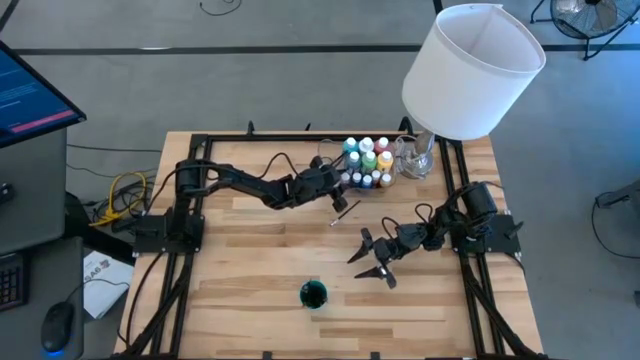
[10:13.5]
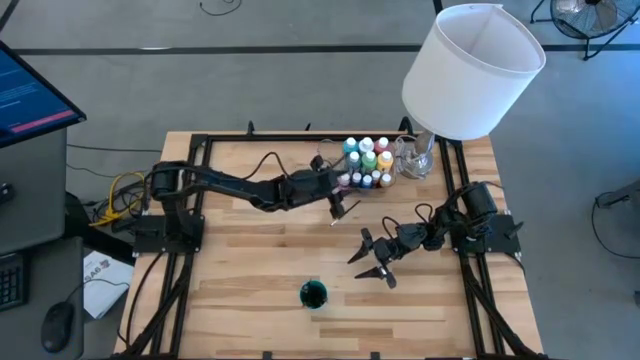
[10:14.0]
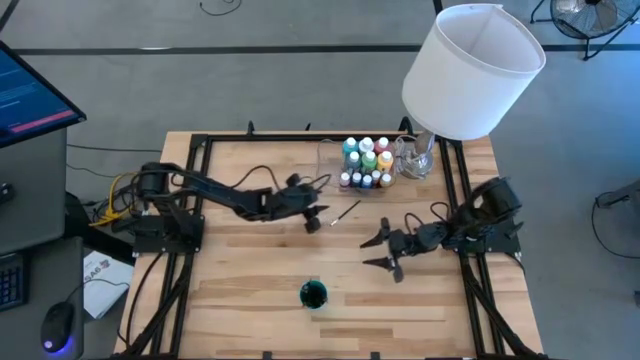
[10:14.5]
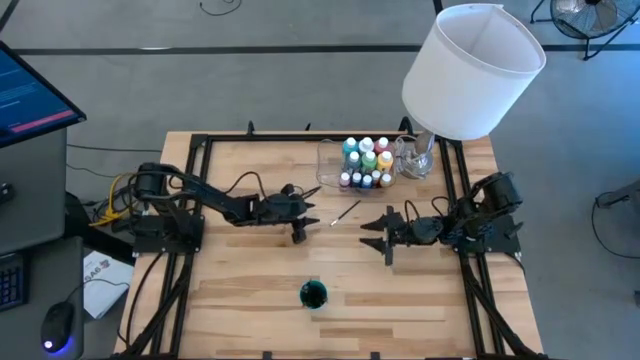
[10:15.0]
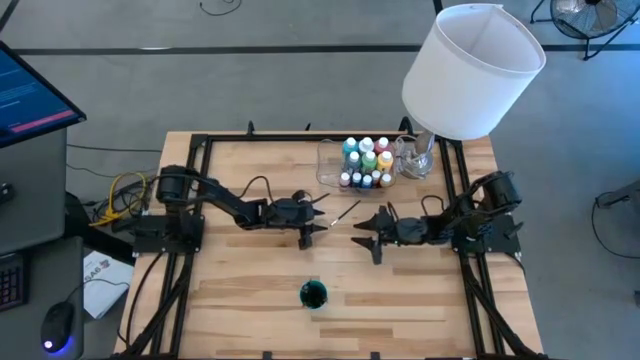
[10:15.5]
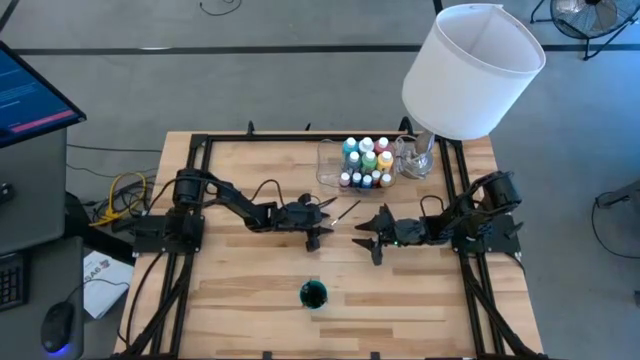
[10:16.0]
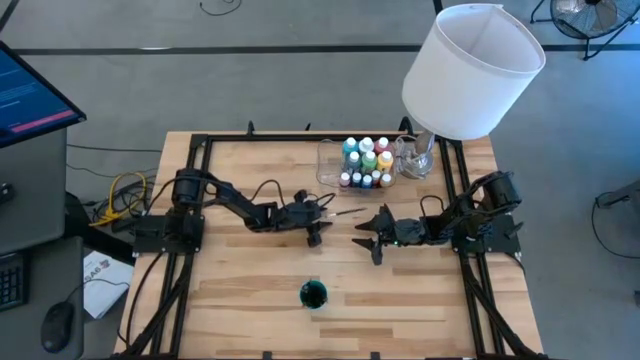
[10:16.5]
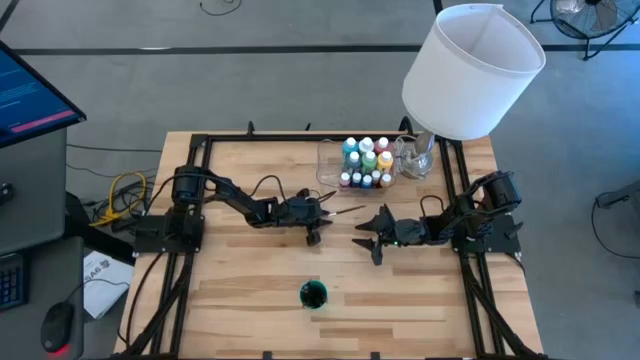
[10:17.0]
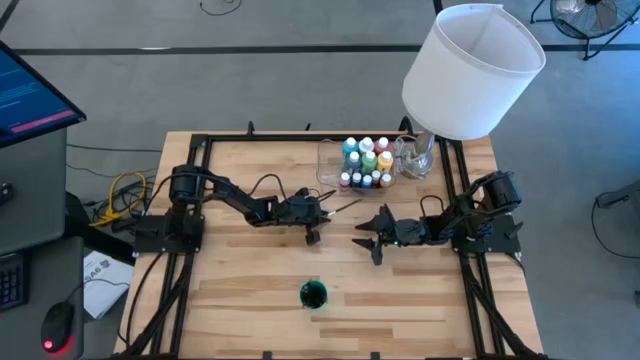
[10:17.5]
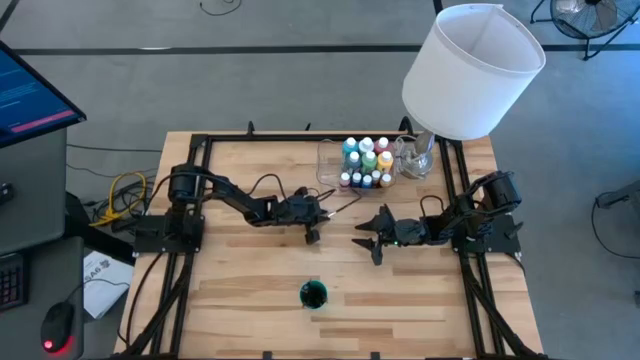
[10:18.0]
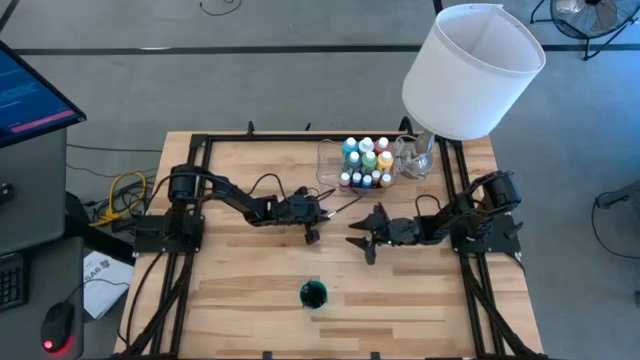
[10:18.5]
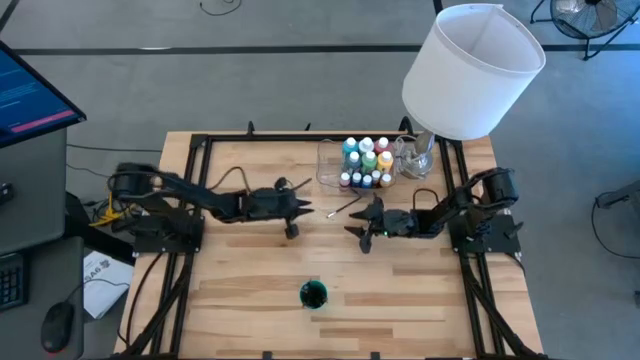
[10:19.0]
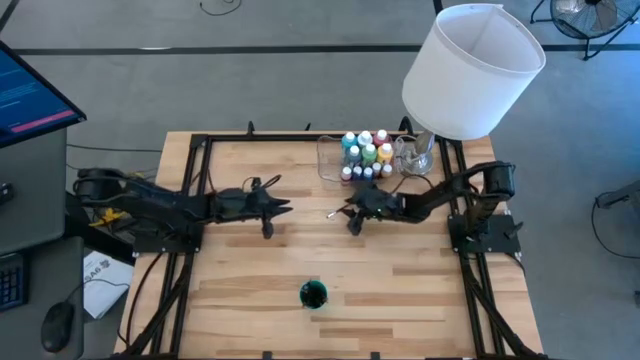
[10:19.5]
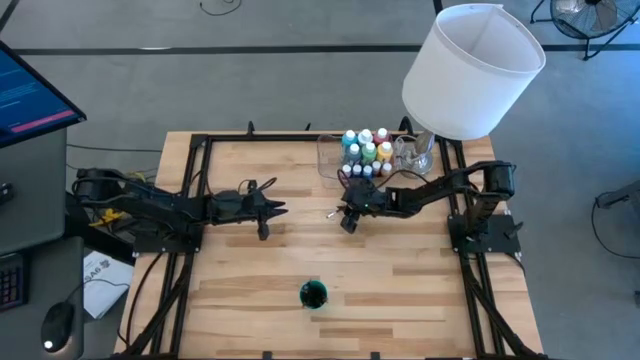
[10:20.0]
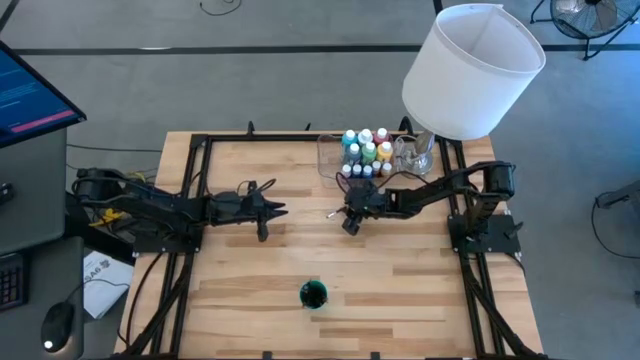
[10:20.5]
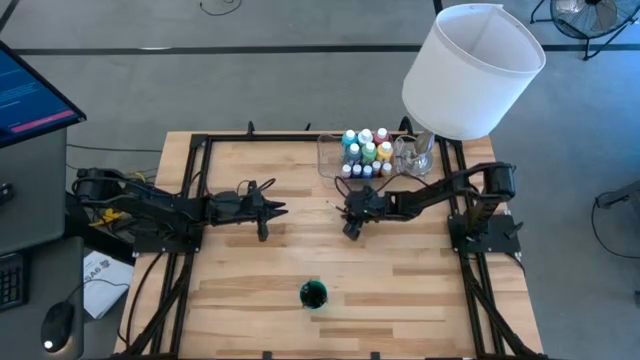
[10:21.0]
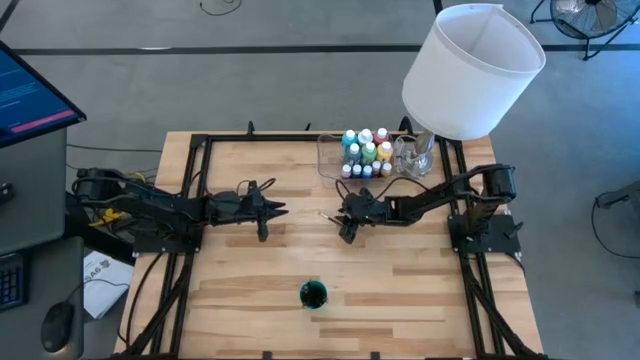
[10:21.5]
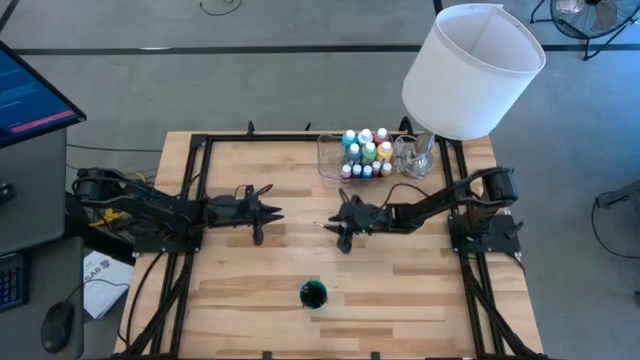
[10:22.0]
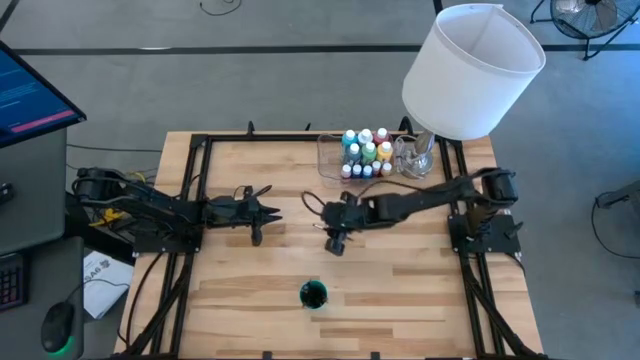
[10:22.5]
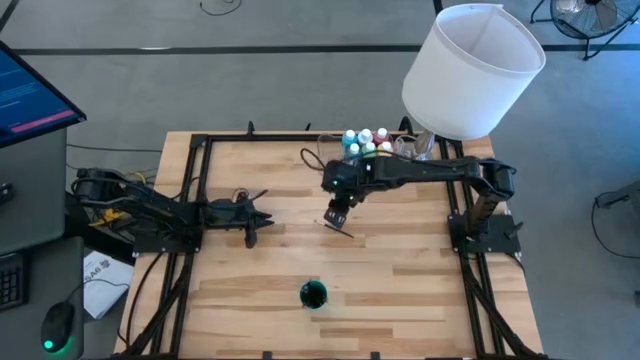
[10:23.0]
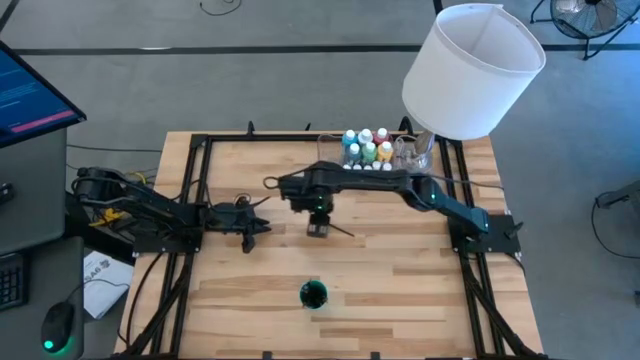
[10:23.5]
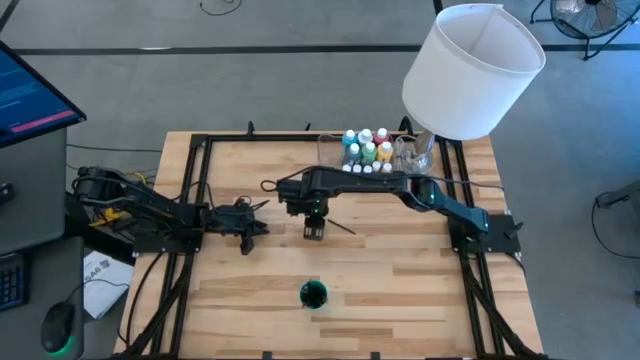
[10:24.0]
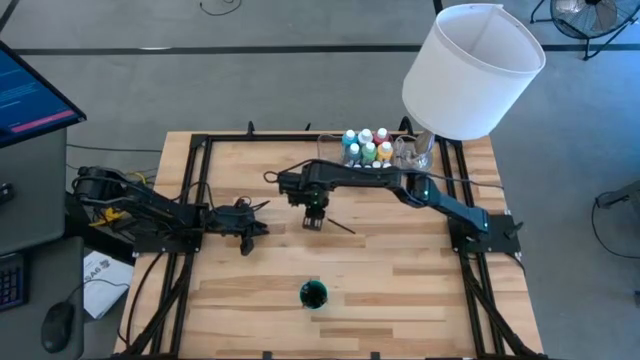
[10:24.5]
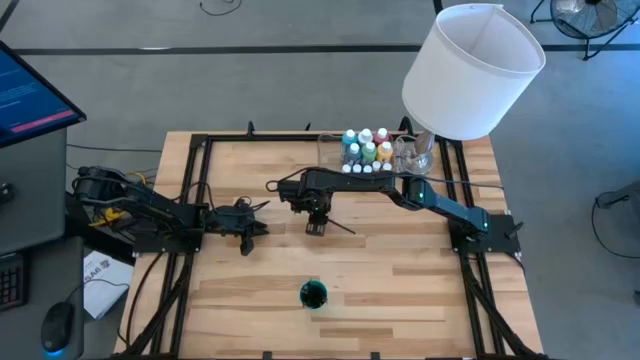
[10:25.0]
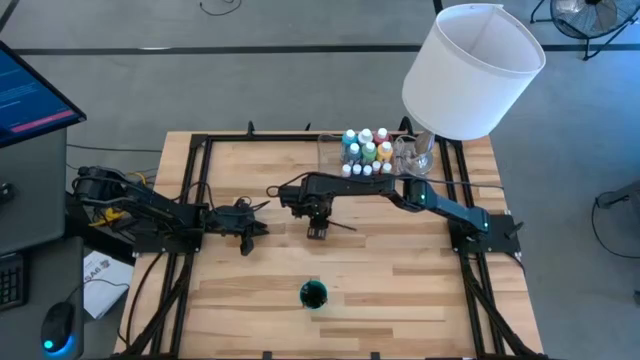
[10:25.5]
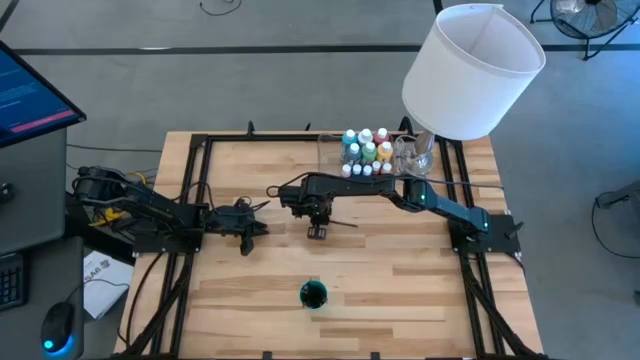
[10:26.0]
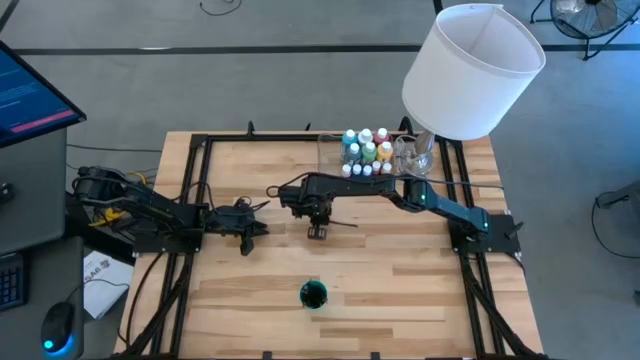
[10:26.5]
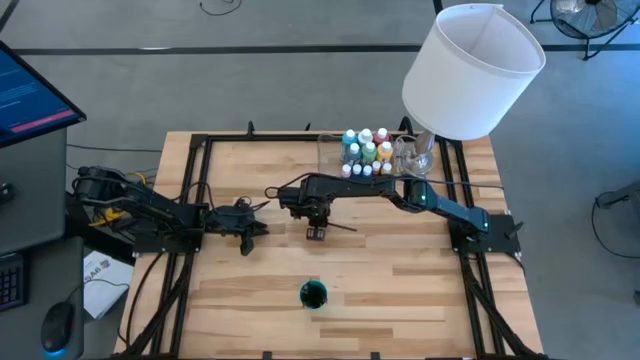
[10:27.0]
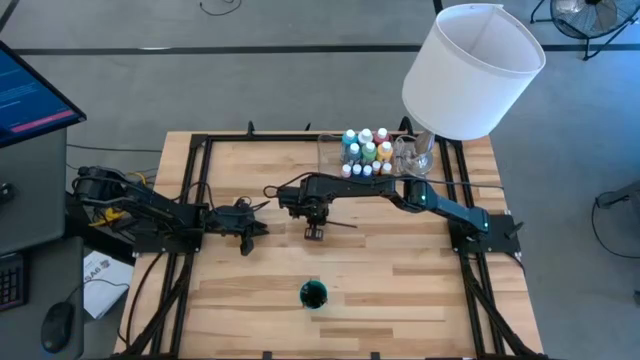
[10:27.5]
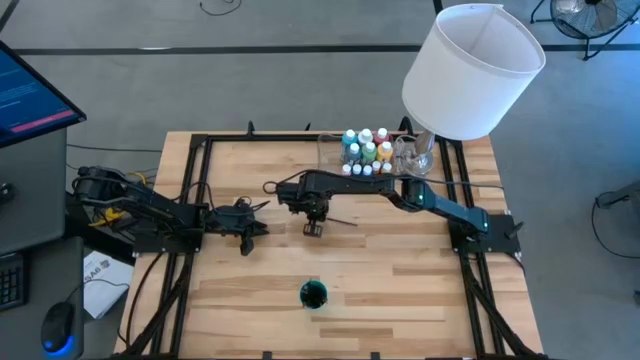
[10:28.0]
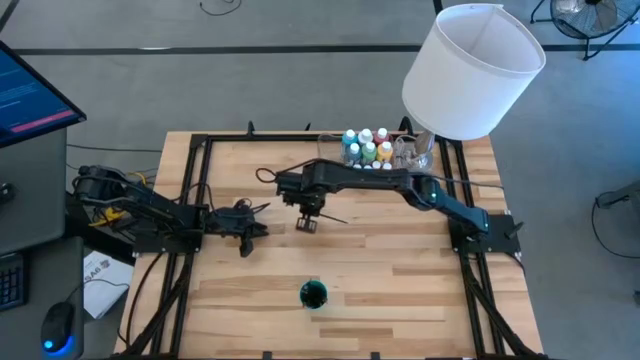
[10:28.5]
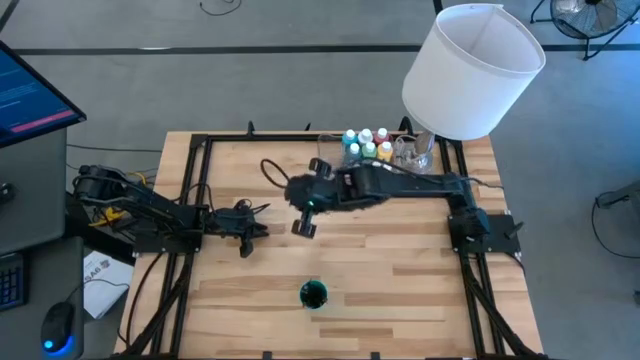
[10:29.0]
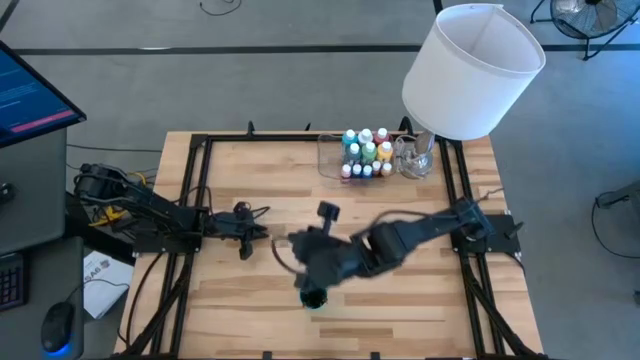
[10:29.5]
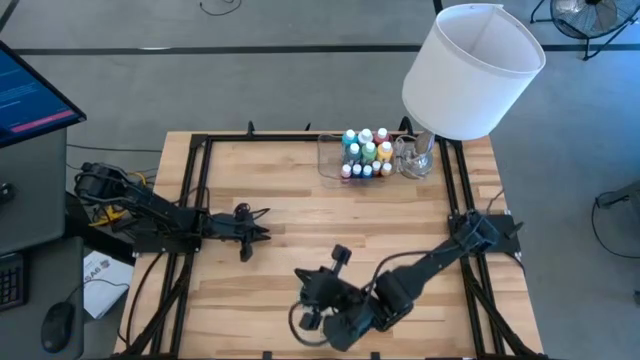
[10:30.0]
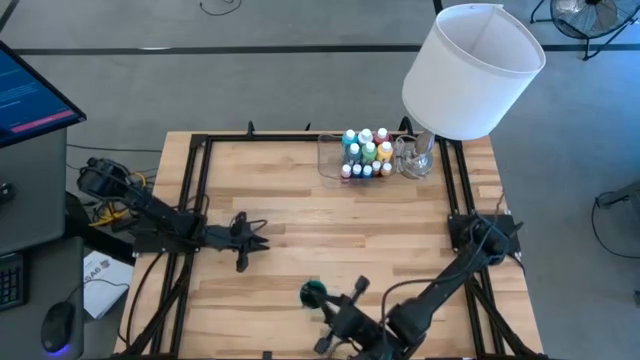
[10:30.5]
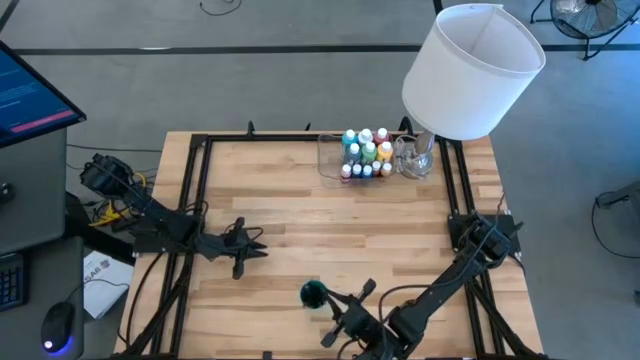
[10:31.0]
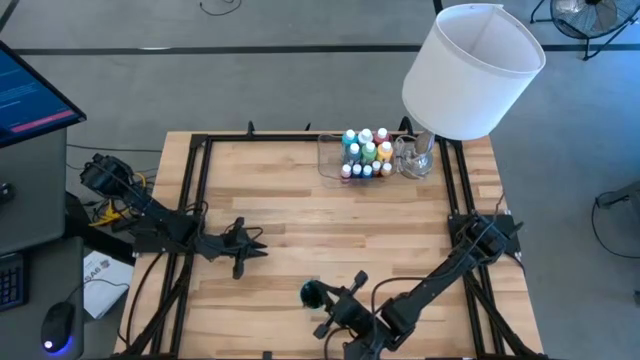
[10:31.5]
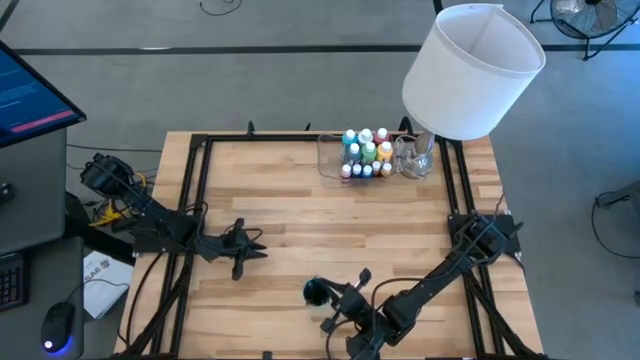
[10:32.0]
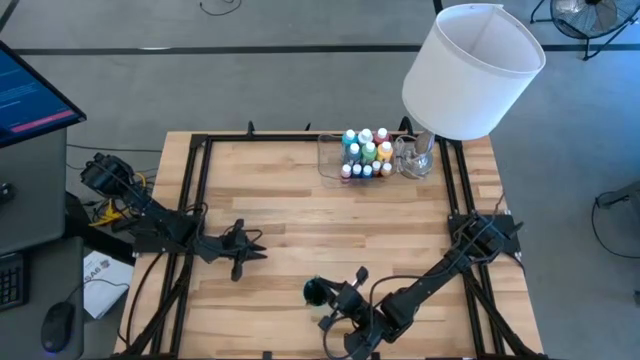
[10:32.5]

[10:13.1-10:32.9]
Task: Pick & Place Paint Supplies
Put the silver paintbrush into the green cup
